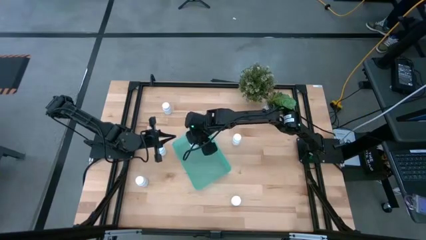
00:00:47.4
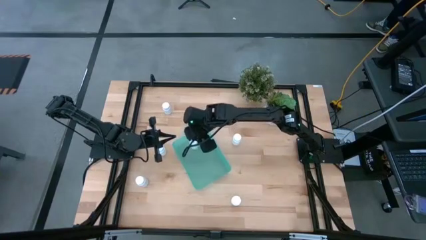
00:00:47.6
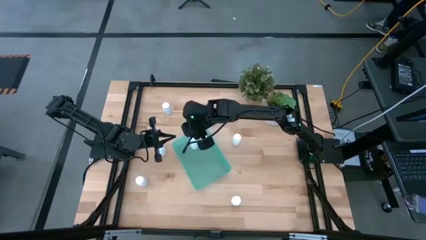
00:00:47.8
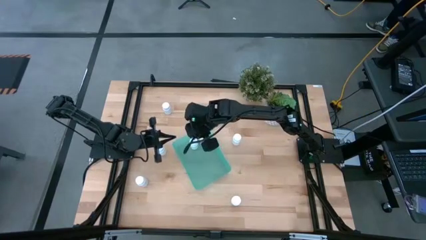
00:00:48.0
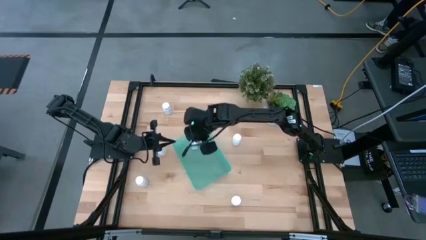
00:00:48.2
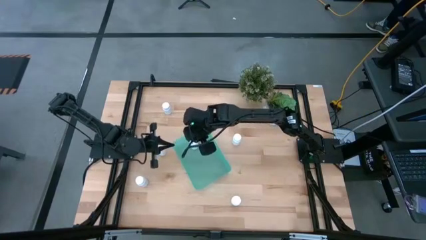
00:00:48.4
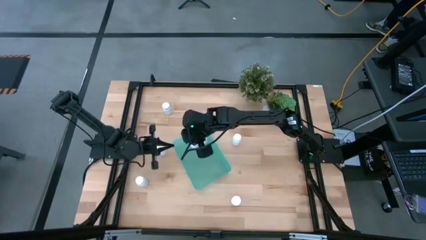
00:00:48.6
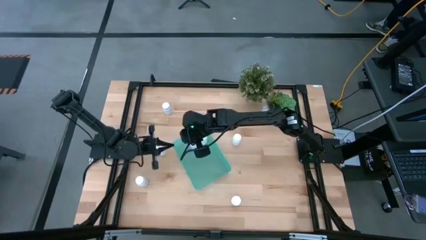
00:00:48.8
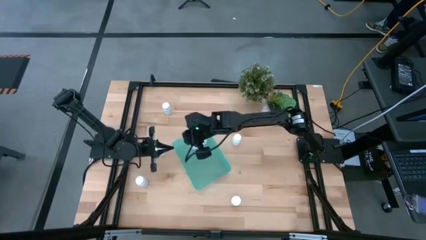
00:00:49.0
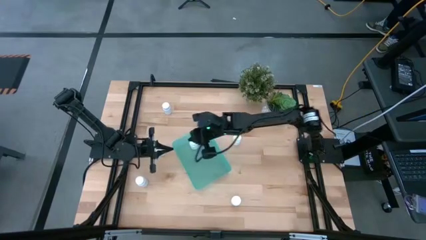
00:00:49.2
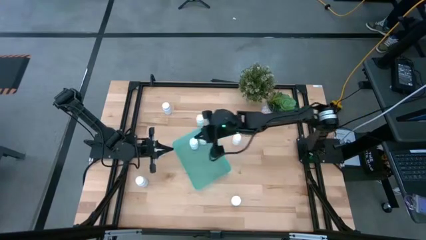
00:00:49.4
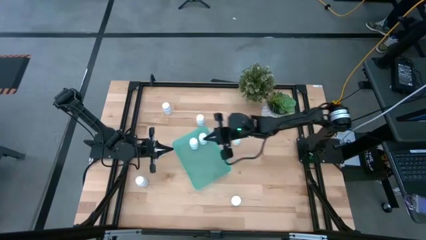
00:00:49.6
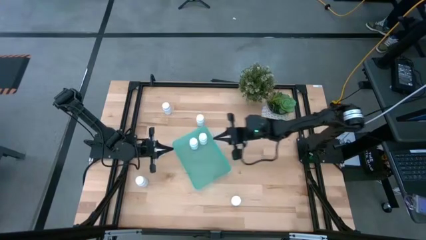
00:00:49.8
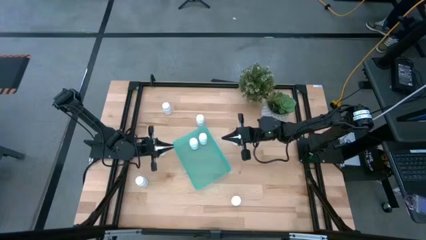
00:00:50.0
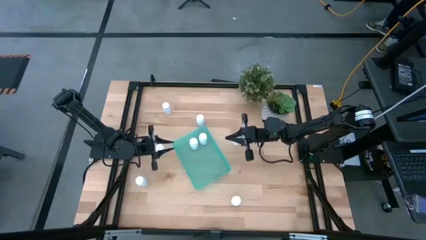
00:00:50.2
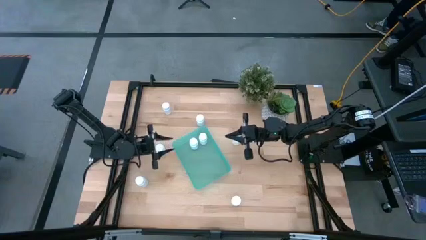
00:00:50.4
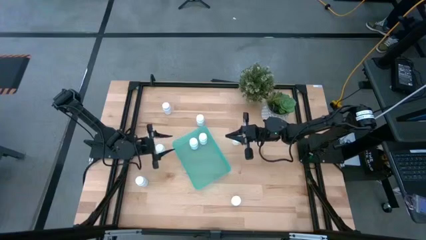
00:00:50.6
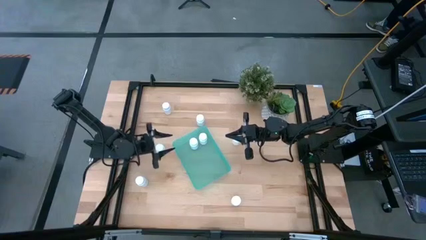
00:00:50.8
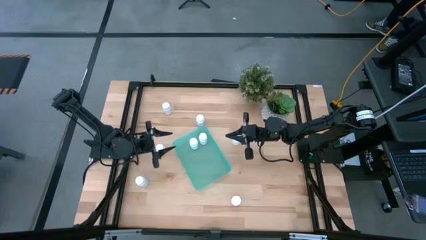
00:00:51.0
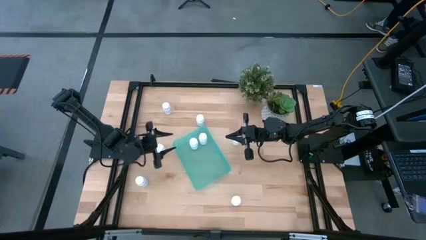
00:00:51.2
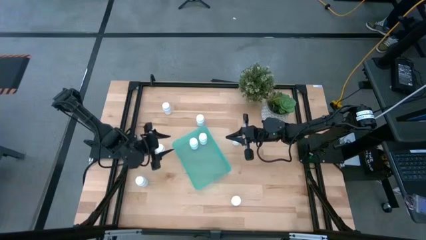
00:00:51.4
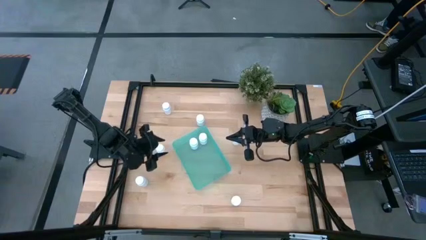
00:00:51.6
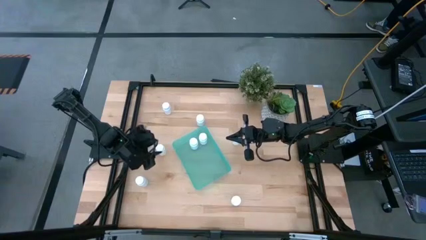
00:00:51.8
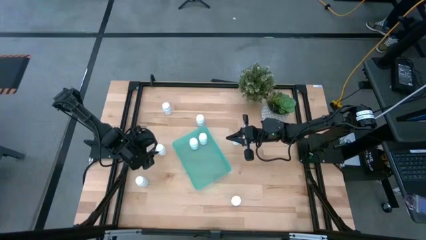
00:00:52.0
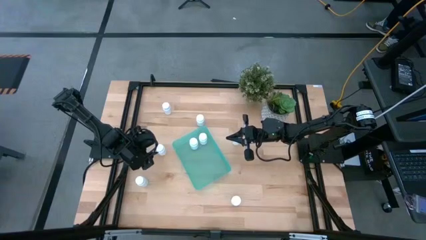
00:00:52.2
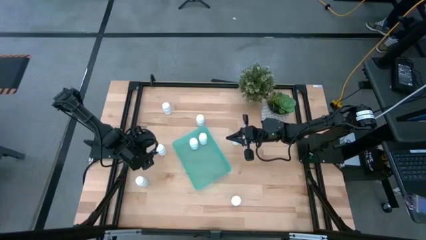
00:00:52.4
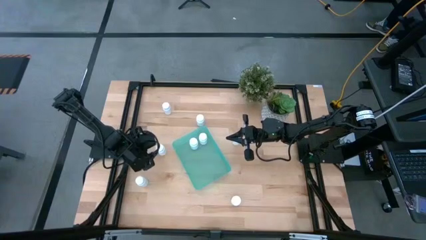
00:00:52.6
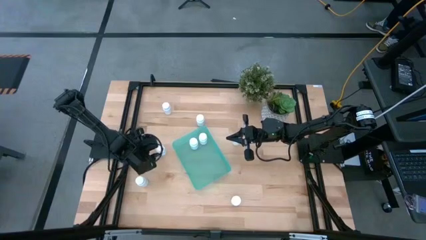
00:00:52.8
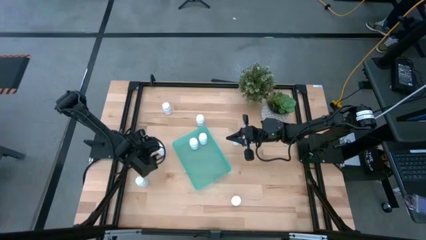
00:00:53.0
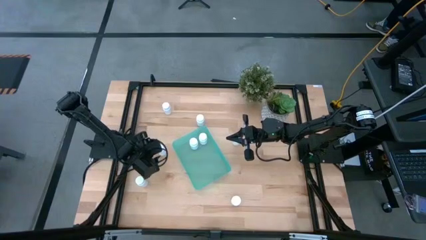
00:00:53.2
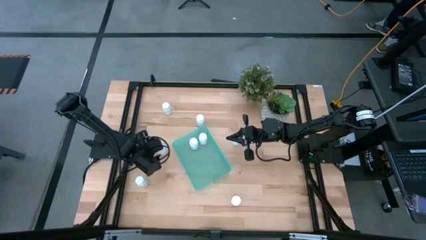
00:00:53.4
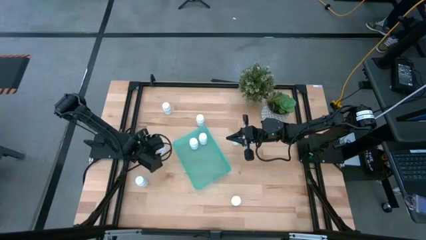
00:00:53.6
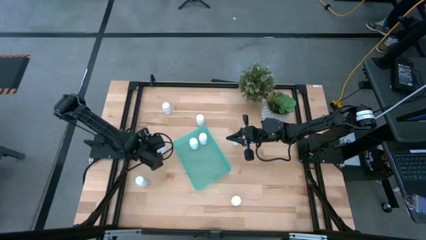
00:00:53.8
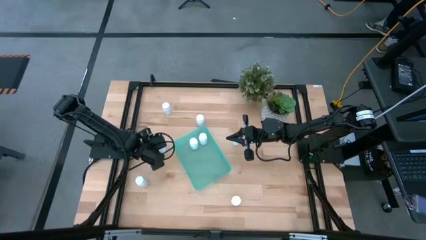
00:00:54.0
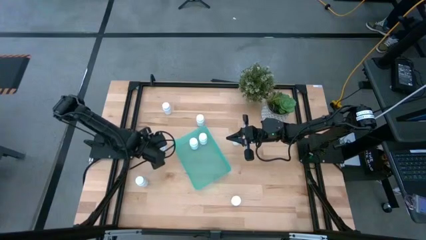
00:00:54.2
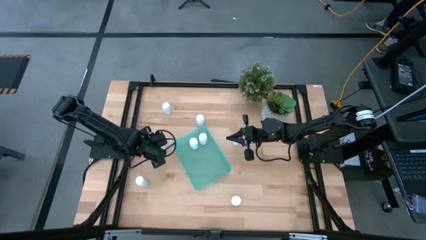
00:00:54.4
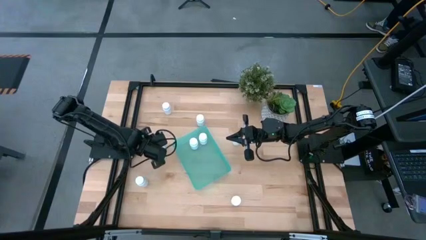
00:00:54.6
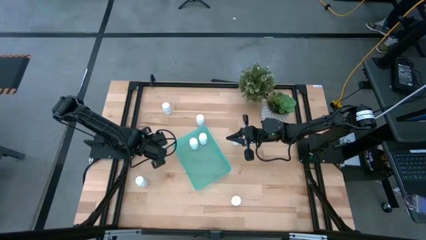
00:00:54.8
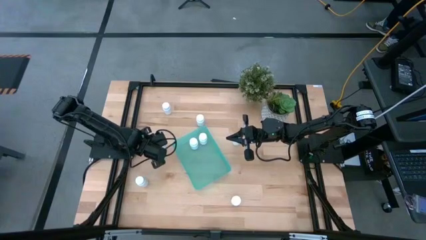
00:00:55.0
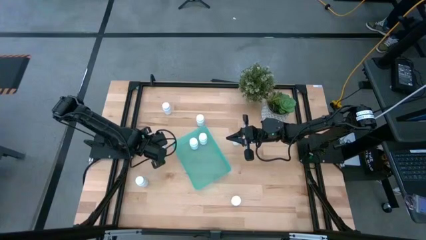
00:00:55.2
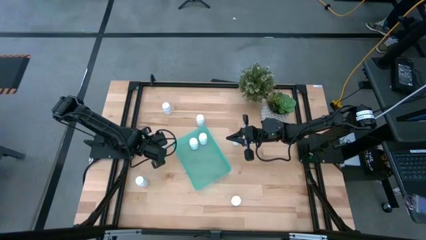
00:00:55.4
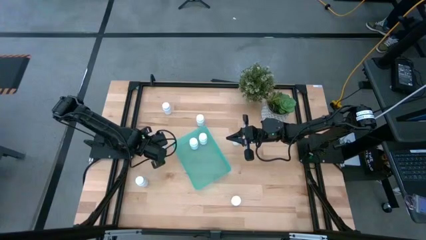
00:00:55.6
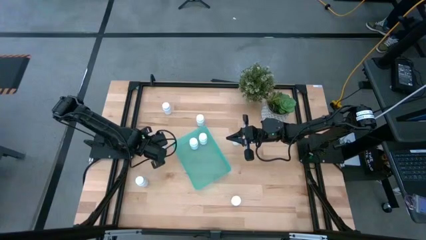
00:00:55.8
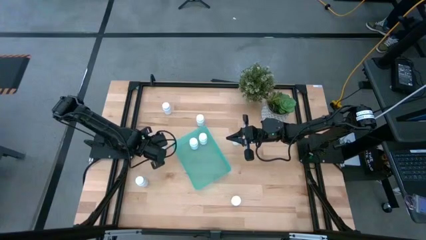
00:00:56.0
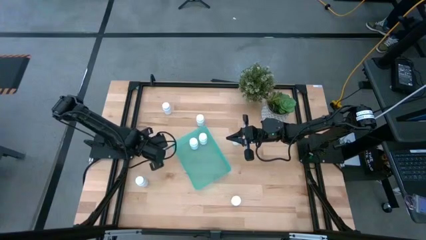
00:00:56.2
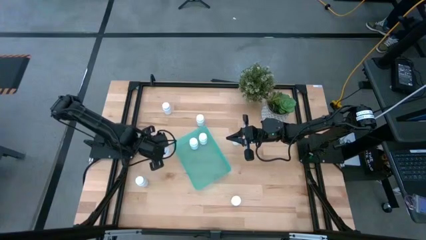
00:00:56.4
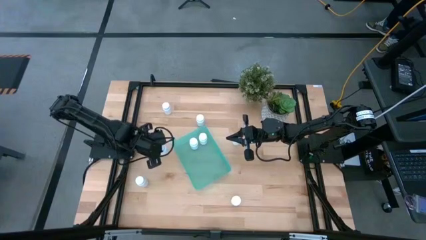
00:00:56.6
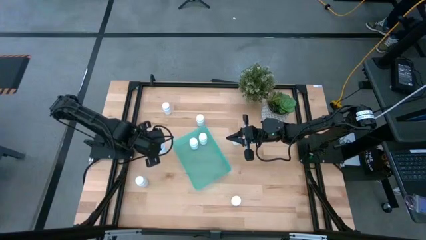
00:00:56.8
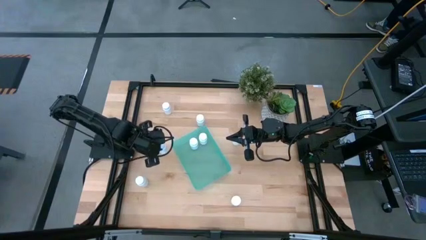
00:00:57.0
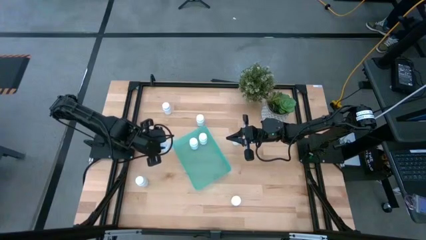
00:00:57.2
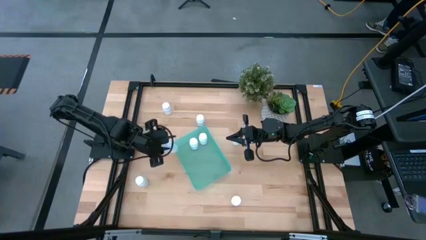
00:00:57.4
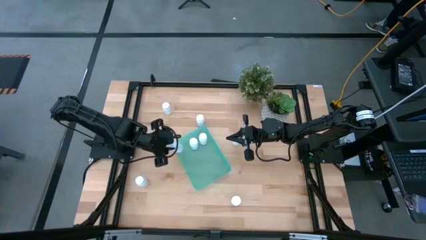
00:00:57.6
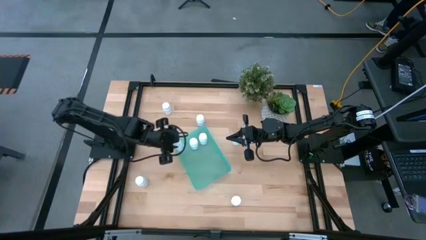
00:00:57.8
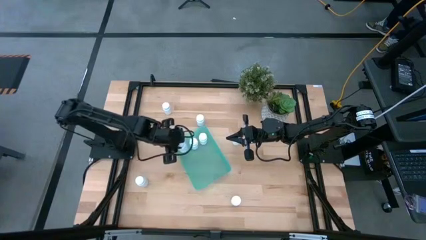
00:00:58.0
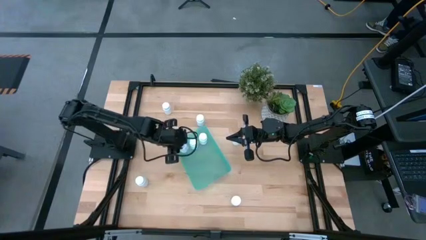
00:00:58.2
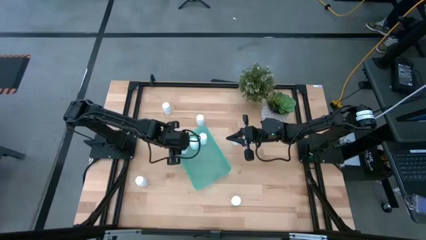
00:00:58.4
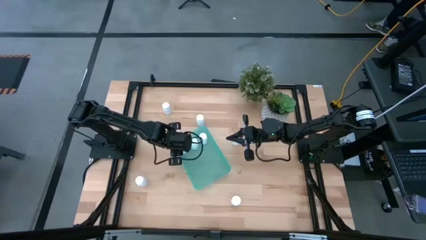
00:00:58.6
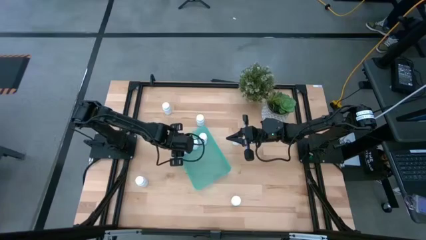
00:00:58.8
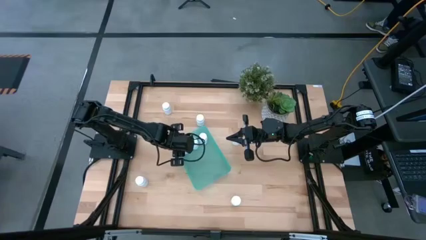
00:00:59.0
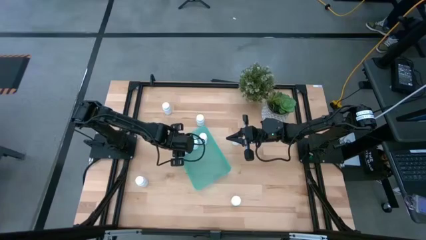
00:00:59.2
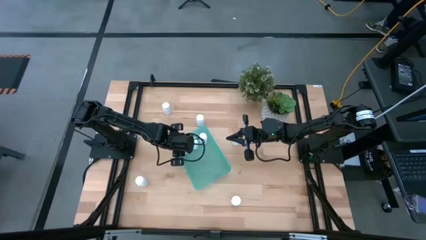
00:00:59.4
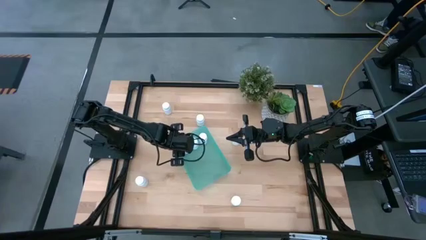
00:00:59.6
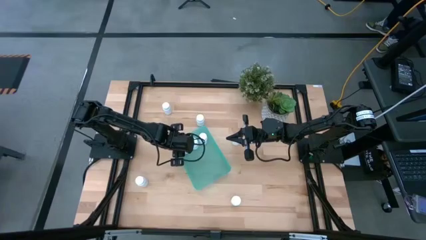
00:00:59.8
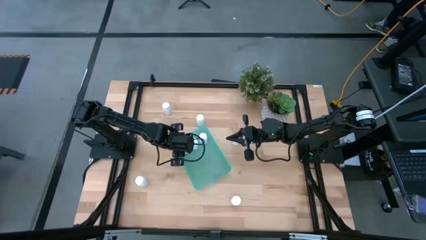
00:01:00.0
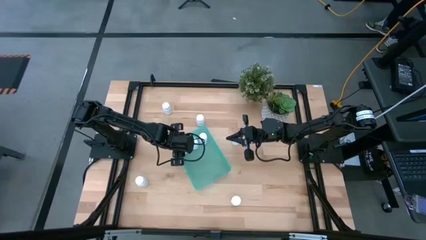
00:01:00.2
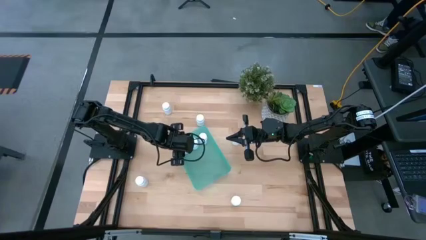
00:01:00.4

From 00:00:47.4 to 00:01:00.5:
Task: Pick and place pill bottles into a basket
Put the white medicine bottle into the green bin

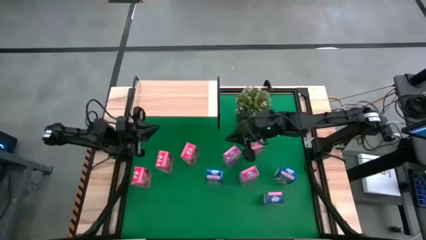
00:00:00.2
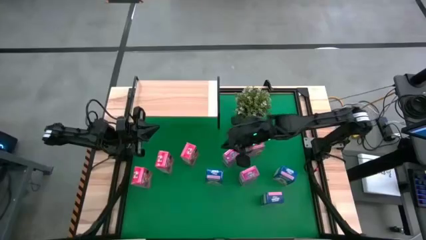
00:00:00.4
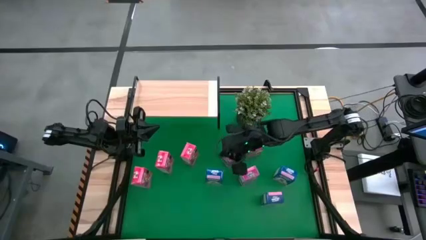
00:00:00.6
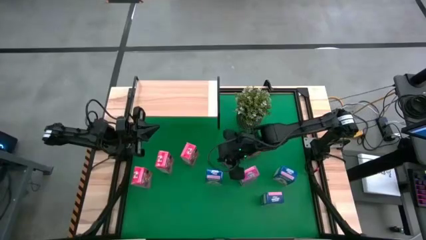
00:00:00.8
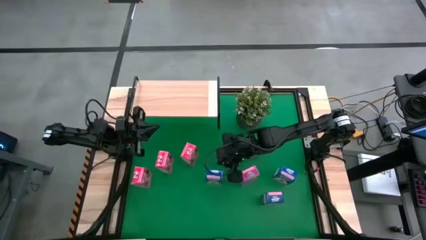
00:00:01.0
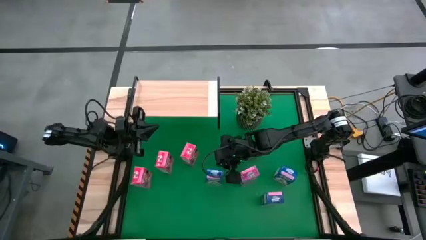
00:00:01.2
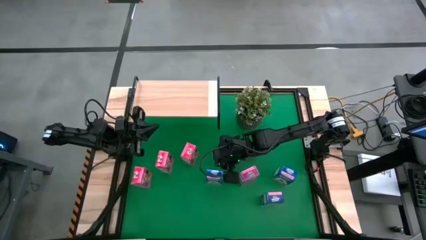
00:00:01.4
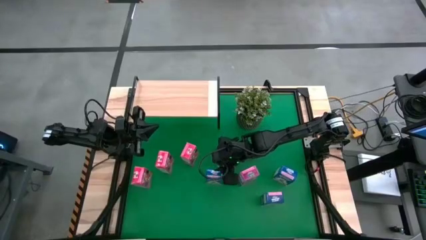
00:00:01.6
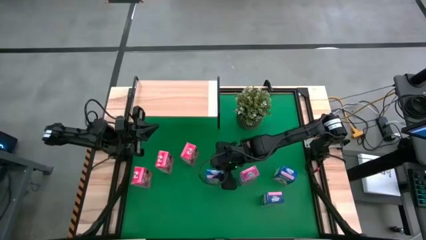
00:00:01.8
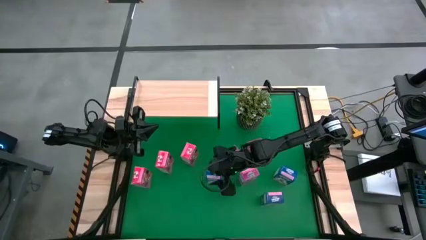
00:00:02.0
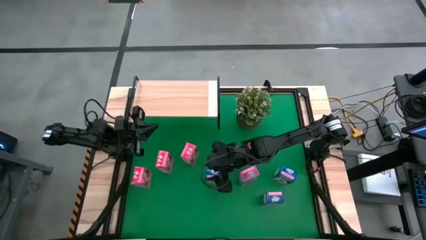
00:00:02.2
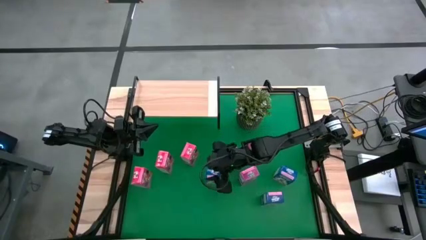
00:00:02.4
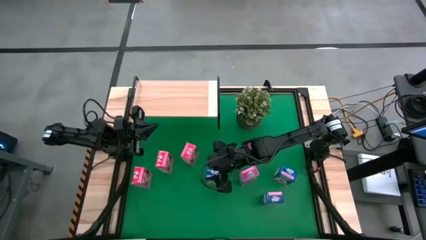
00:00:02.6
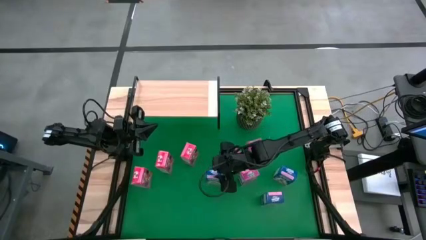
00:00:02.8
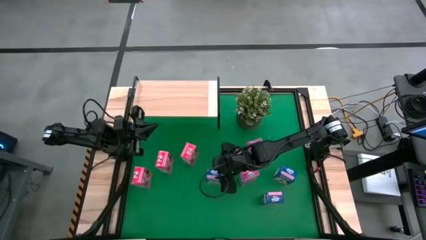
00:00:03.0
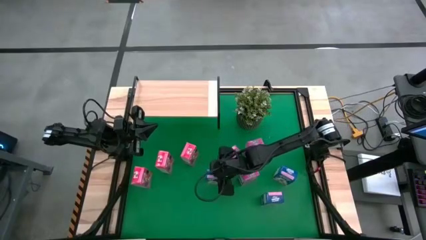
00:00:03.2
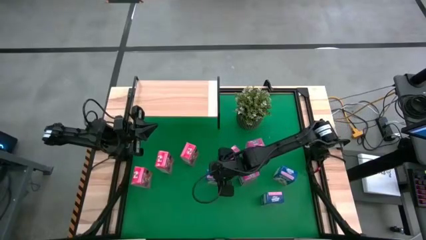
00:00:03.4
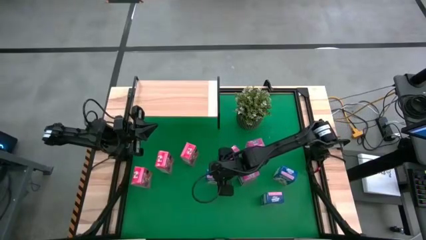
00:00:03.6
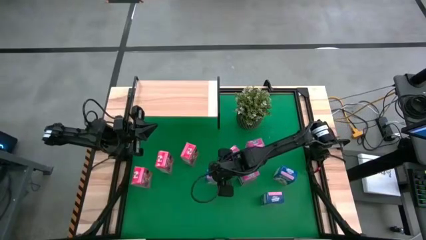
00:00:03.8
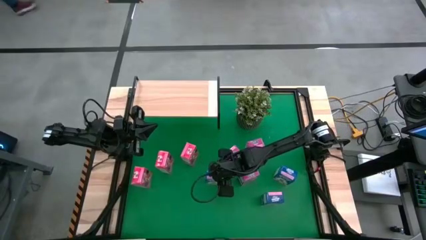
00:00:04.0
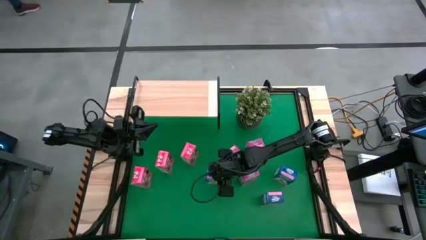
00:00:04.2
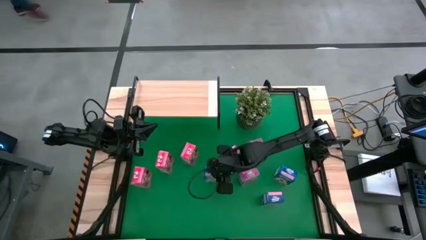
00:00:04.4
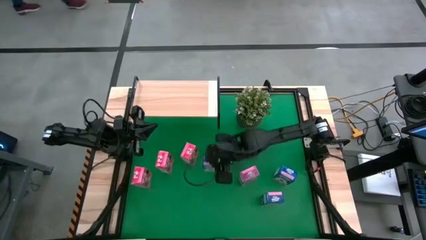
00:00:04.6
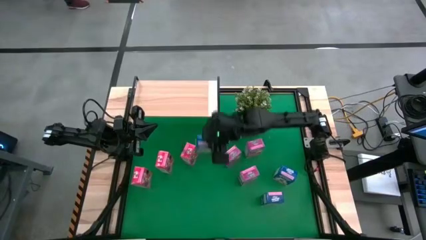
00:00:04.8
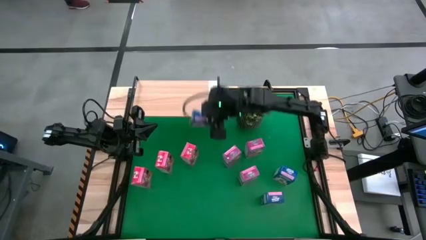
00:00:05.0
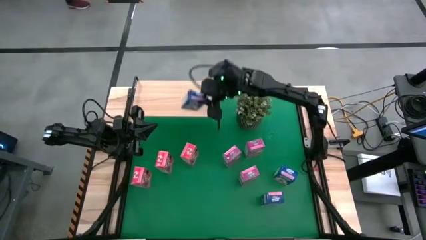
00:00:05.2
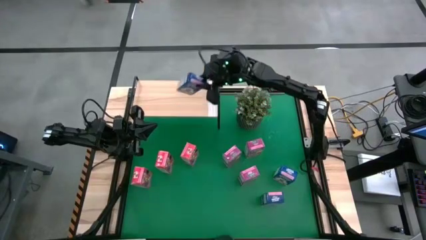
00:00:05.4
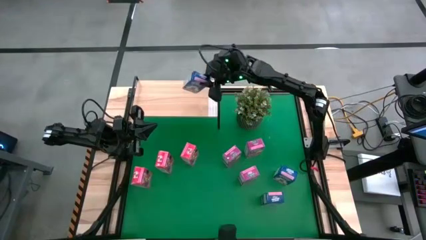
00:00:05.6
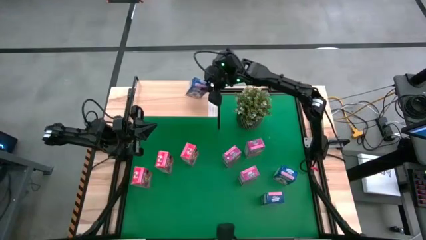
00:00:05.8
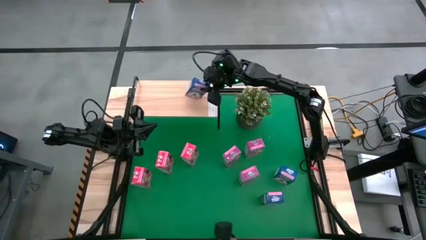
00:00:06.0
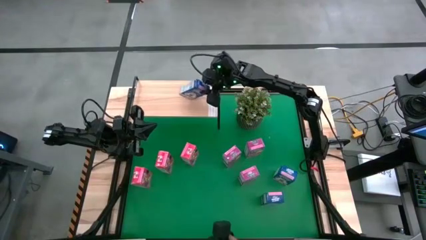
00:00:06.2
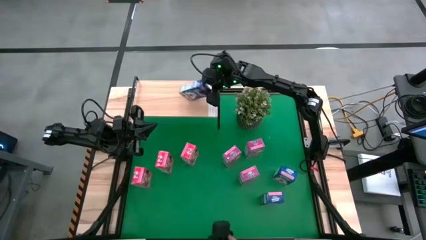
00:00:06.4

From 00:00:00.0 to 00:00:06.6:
Task: Stack cereal on shelf
Put the left blue cereal box on the shelf
